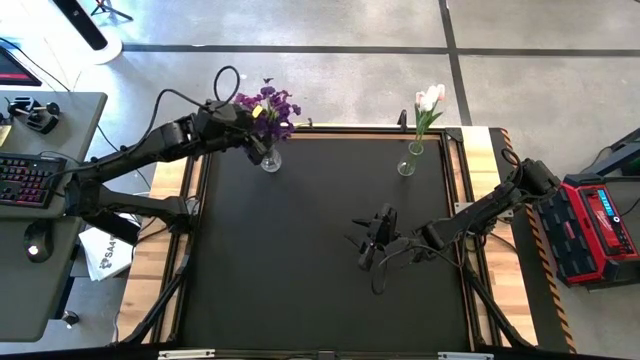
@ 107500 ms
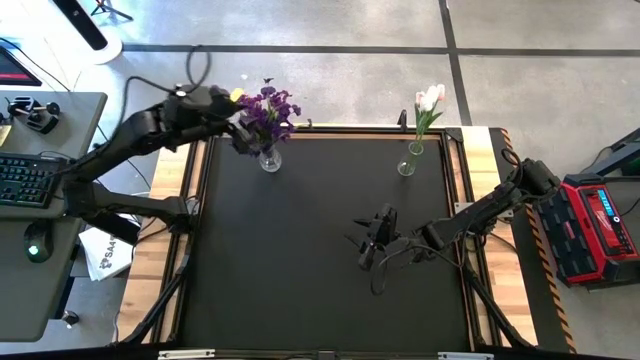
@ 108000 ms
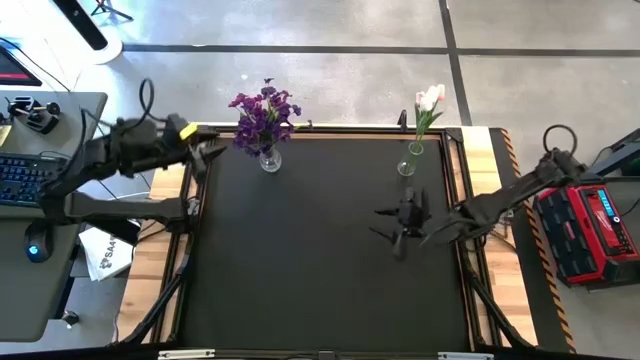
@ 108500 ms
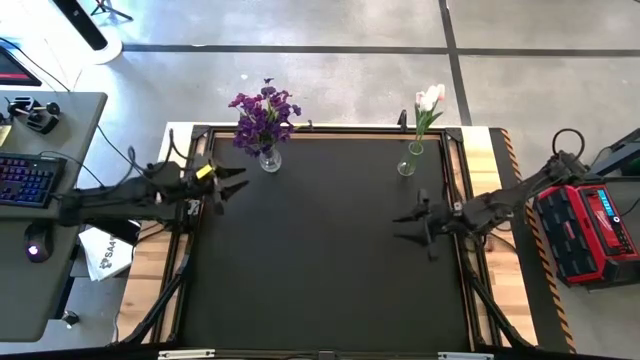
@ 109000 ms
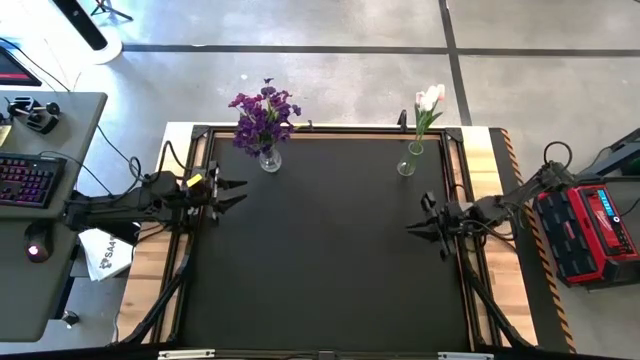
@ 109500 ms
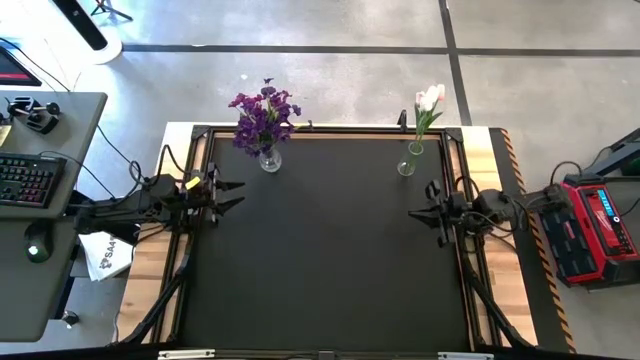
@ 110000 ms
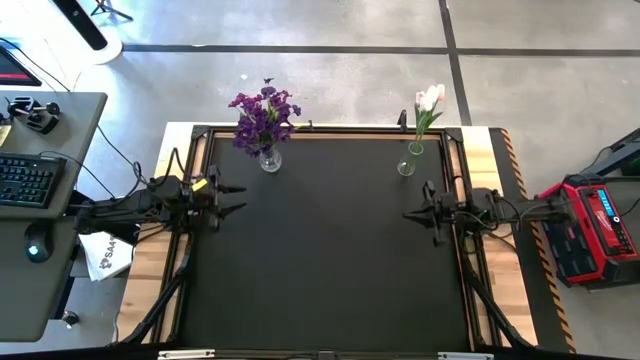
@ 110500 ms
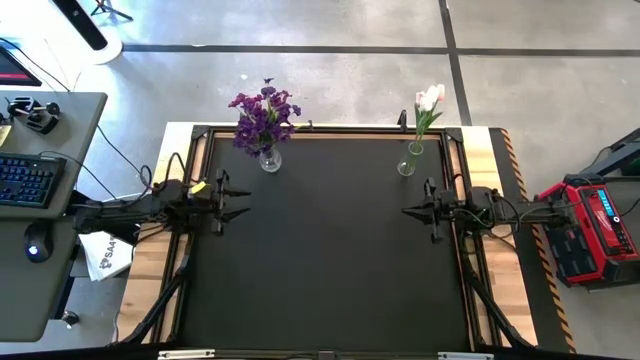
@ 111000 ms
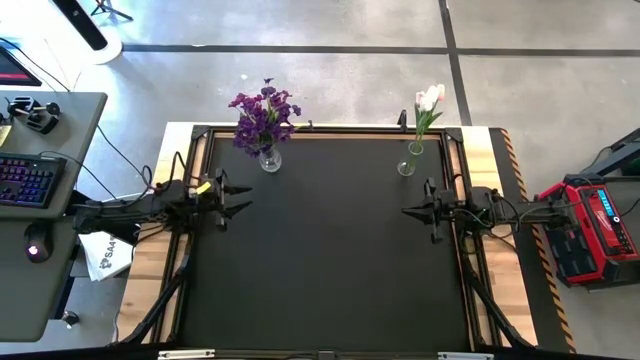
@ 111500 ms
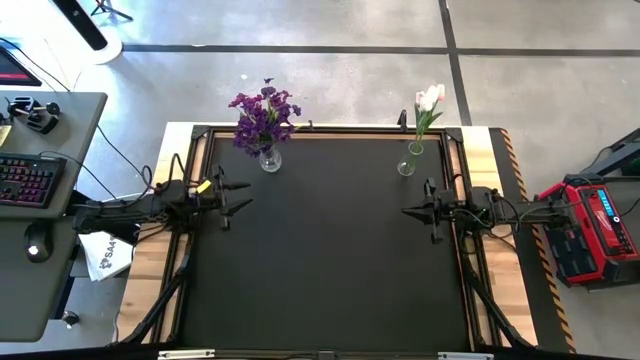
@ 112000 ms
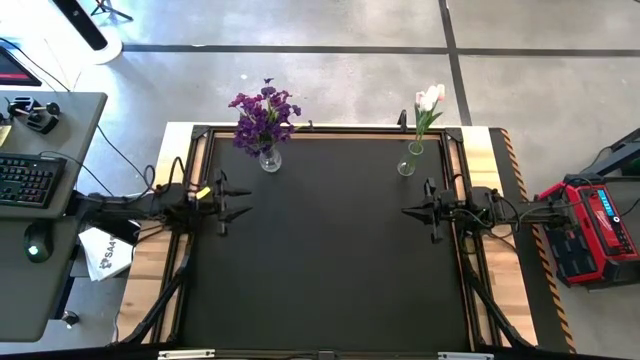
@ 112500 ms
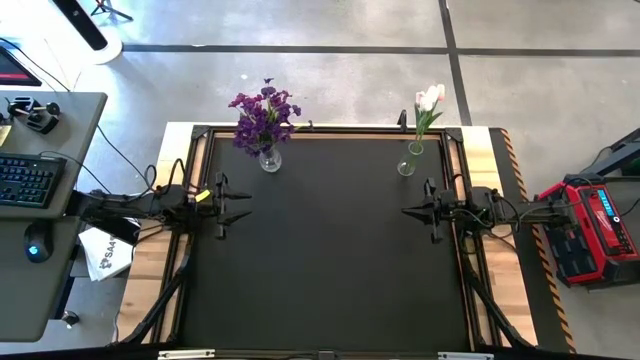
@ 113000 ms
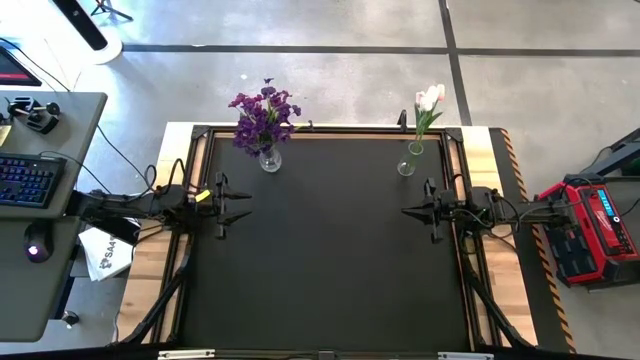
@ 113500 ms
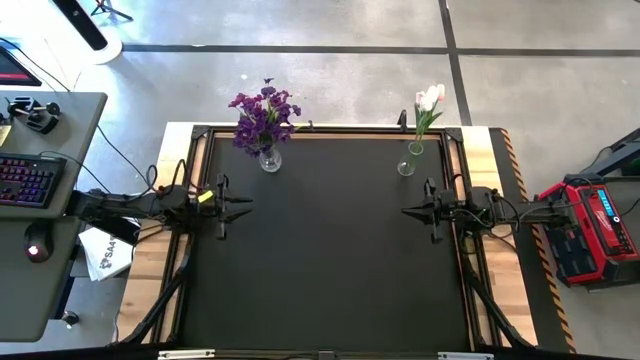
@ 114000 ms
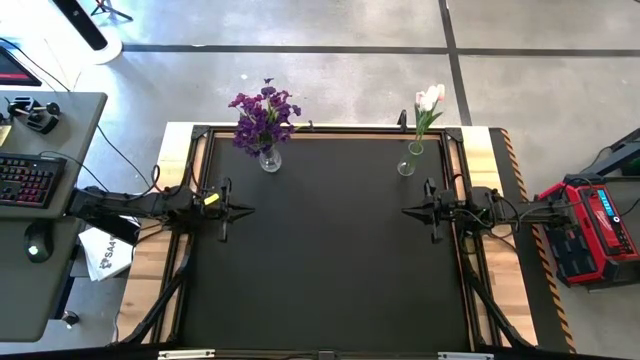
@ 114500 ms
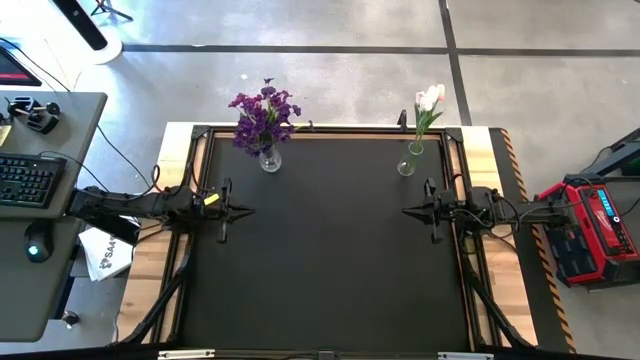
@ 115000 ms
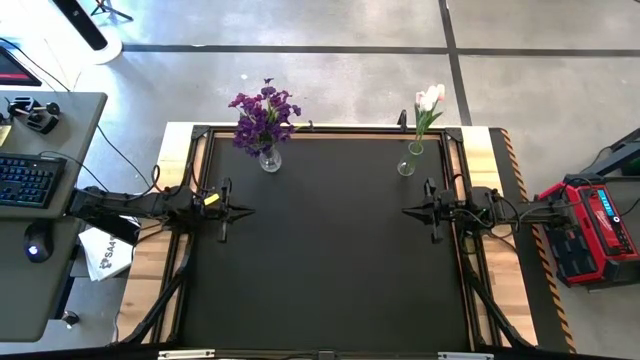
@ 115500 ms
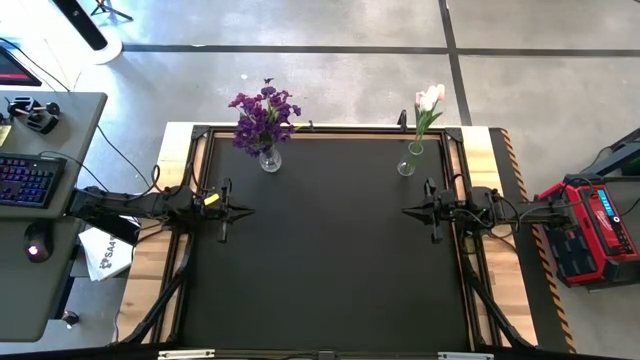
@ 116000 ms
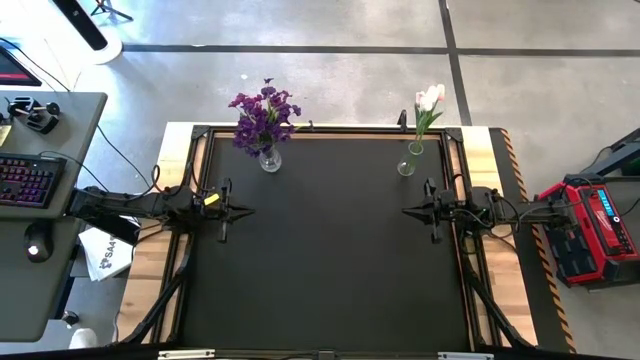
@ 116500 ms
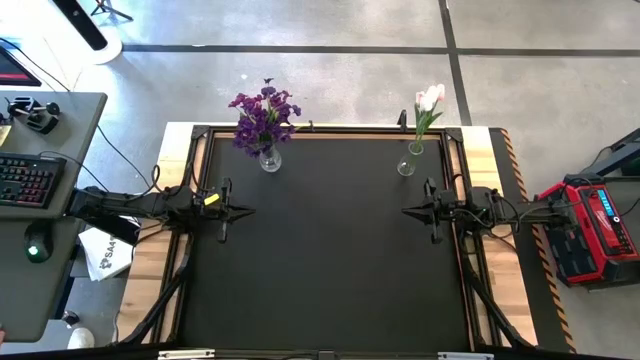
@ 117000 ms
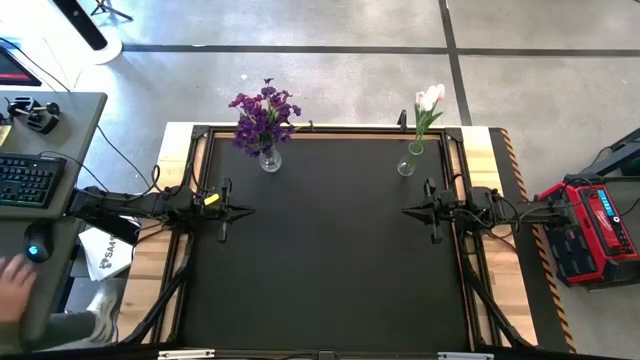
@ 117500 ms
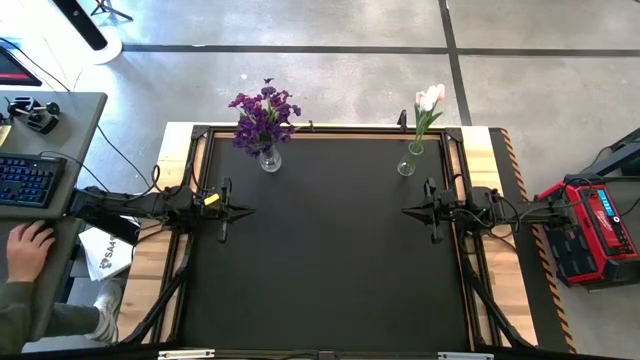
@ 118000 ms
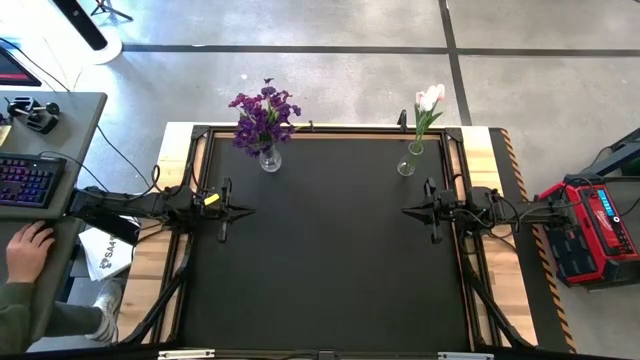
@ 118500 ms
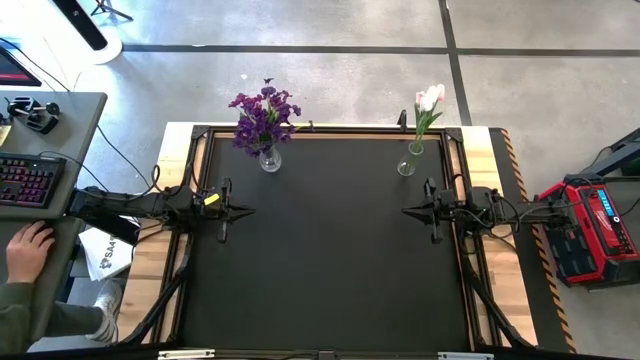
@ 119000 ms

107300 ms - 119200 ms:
Task: Sort flowers into vase by color
Return to Home Position

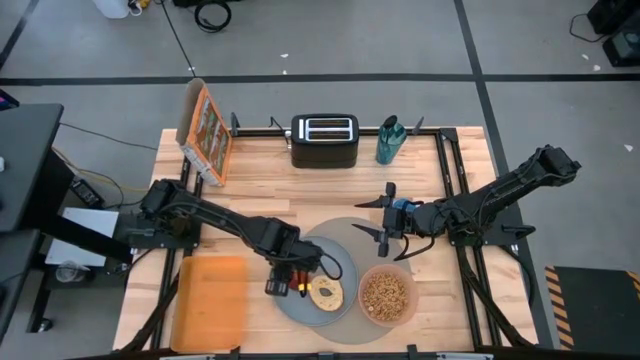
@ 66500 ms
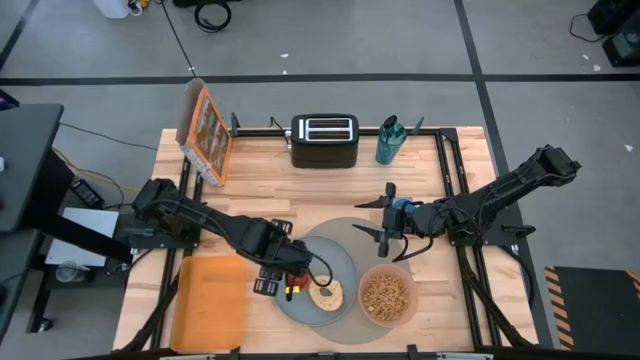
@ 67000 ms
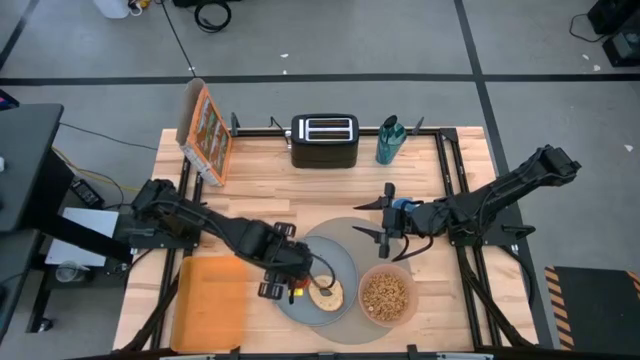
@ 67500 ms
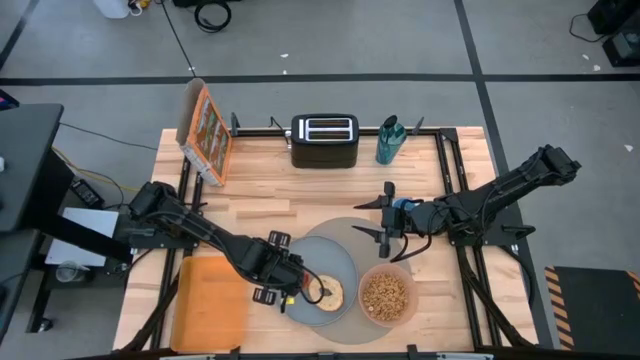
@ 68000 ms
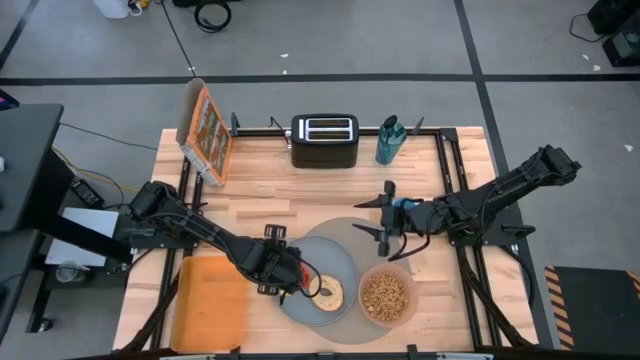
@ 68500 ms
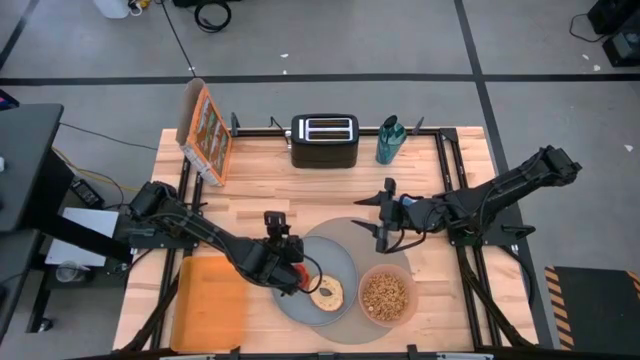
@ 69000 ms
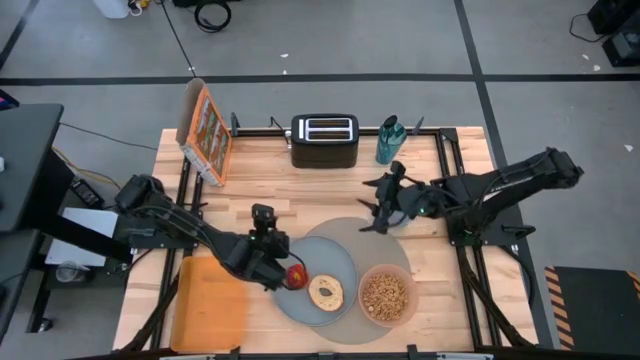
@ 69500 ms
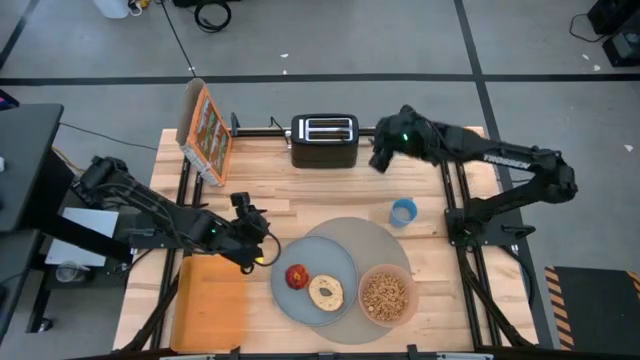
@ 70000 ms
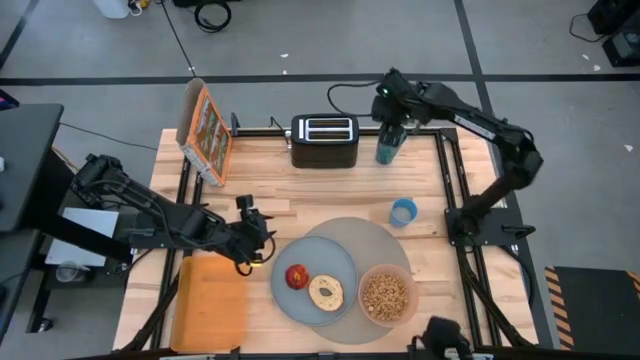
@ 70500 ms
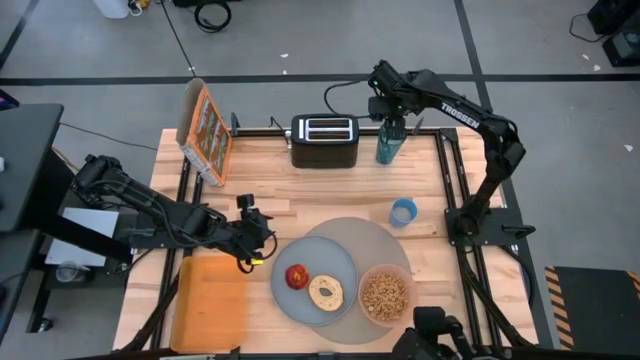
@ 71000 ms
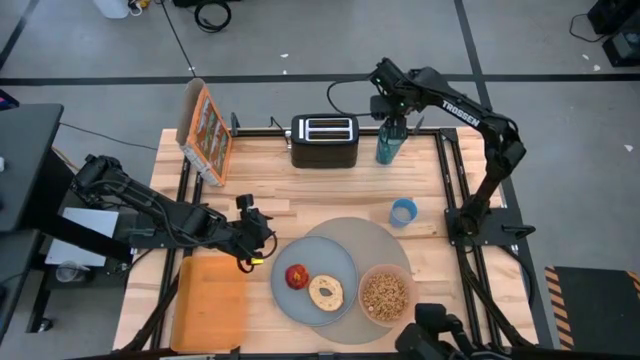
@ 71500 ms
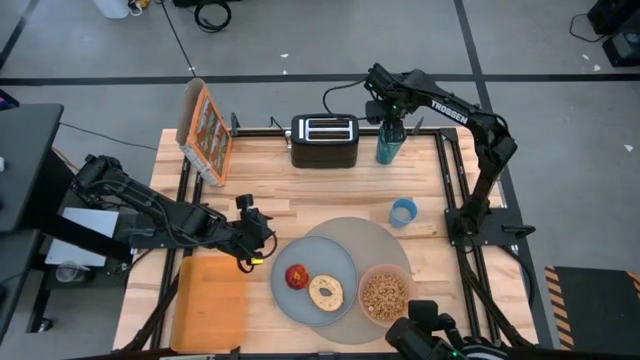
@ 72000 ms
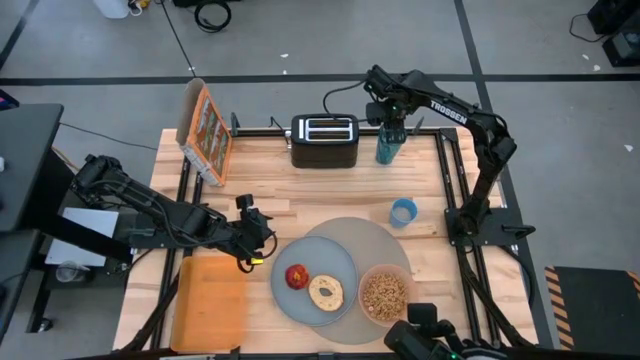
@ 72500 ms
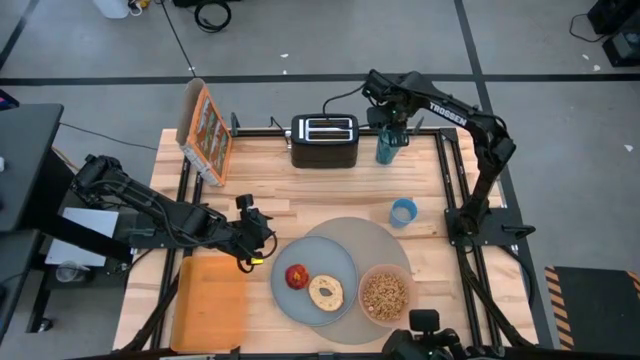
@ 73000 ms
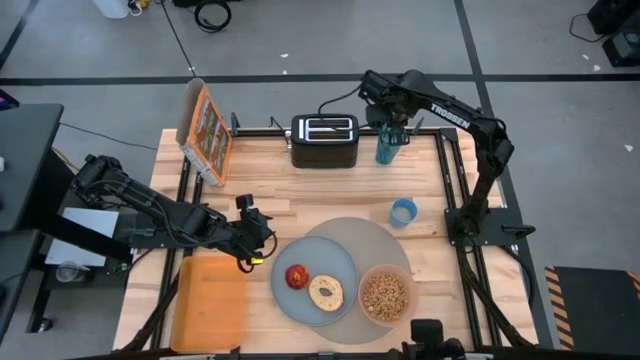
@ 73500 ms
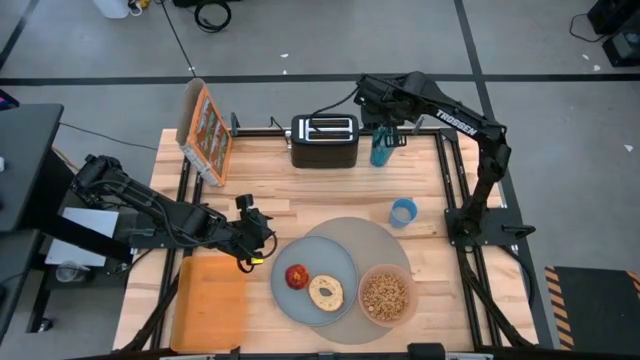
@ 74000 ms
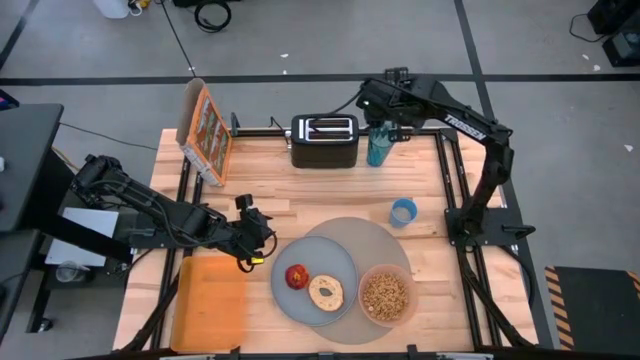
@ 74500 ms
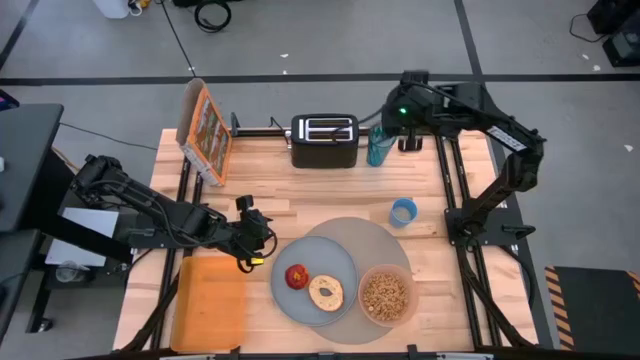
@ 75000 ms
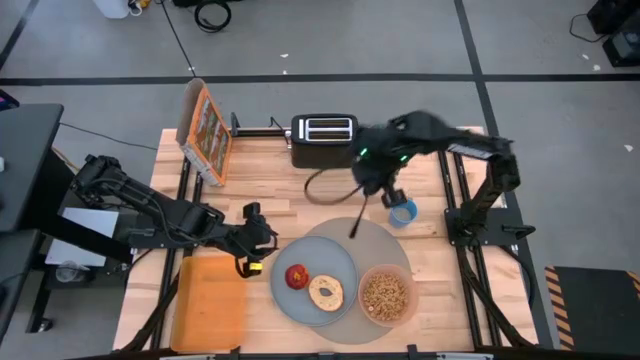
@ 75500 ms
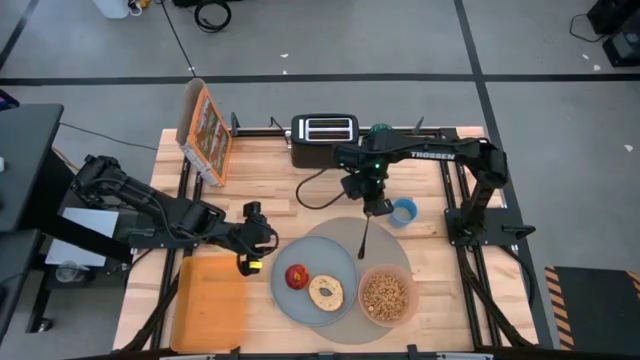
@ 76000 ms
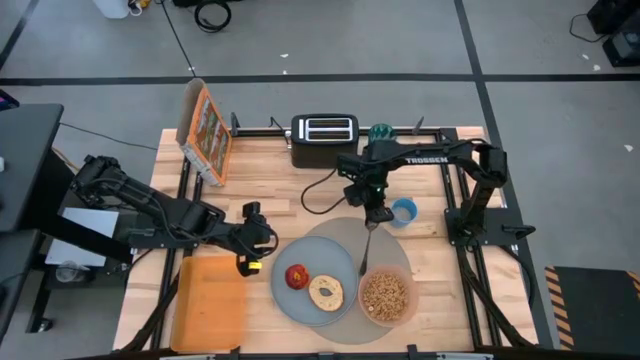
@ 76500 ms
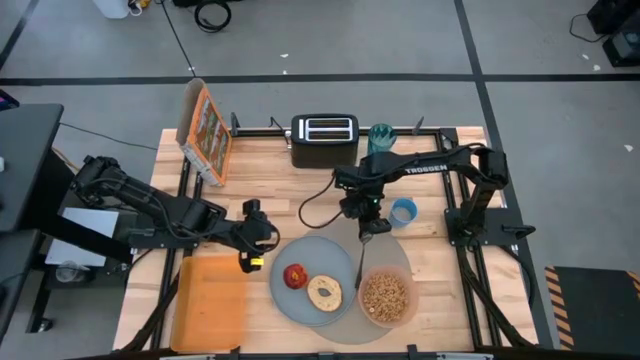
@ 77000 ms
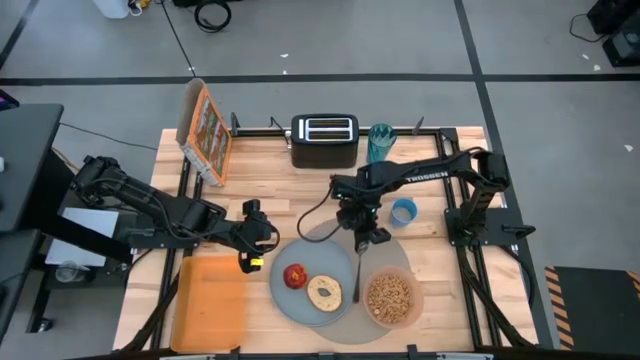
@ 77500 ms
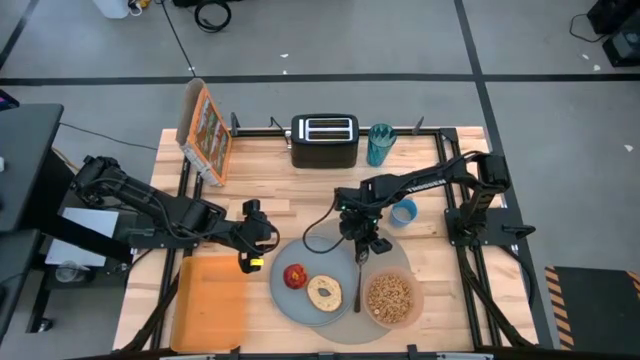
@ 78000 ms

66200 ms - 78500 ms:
Task: Arrange a breakfast setting
Put the black spoon to the right of the blue plate on the brown placemat
